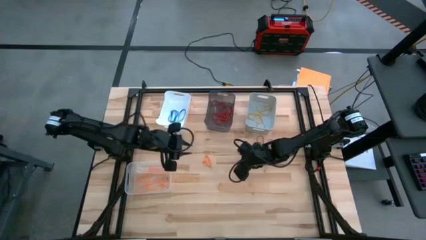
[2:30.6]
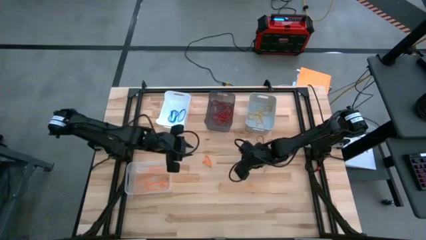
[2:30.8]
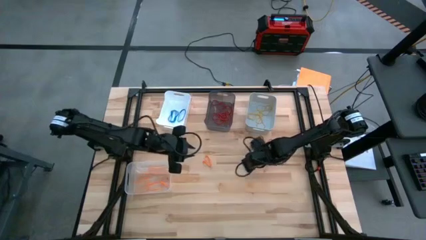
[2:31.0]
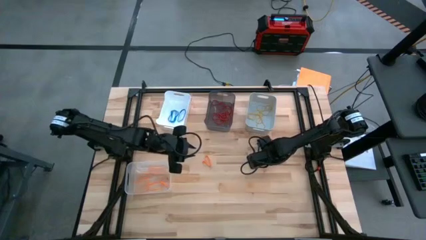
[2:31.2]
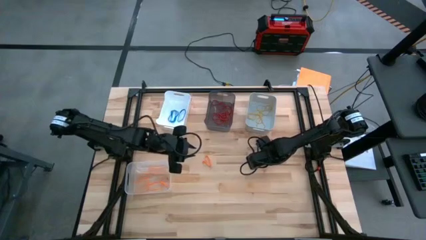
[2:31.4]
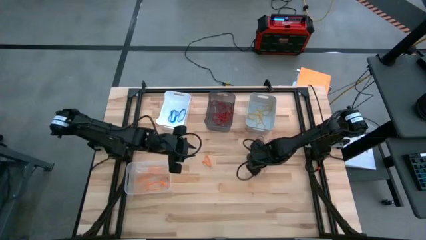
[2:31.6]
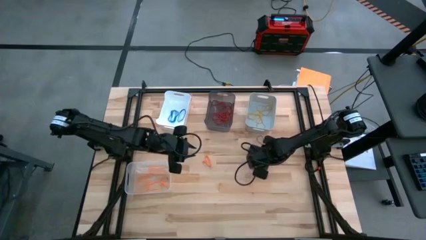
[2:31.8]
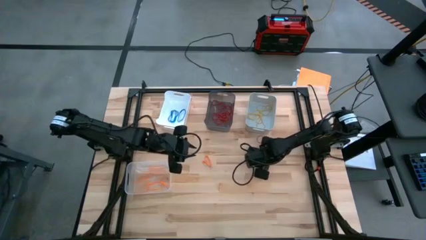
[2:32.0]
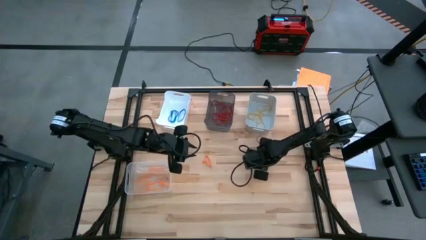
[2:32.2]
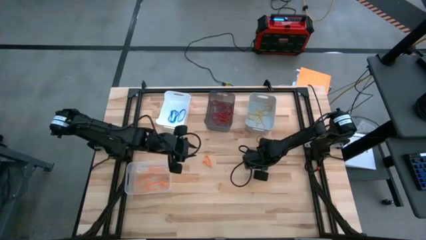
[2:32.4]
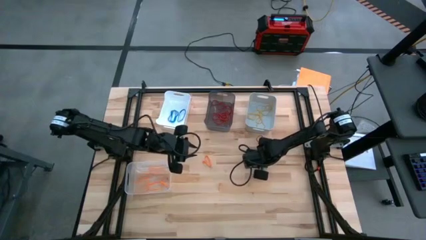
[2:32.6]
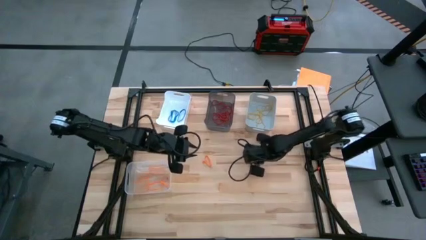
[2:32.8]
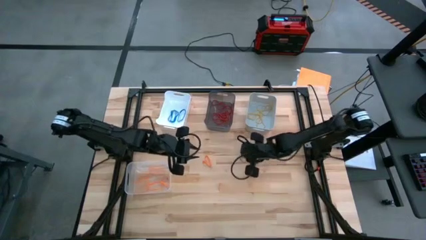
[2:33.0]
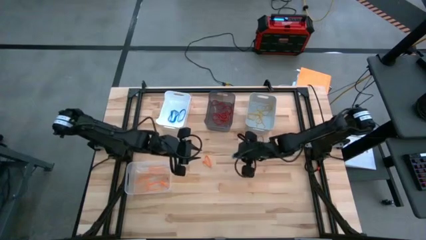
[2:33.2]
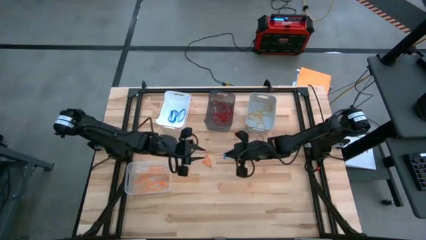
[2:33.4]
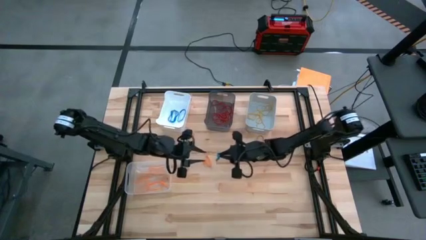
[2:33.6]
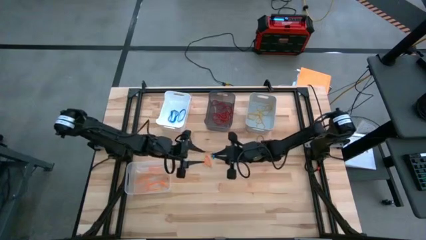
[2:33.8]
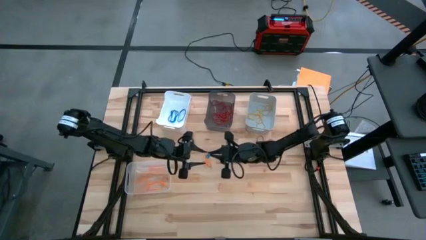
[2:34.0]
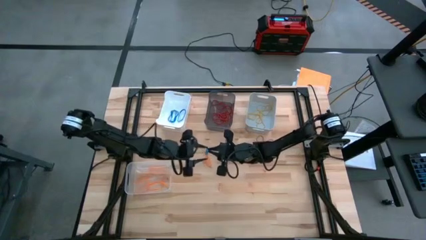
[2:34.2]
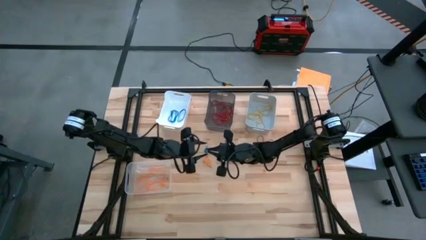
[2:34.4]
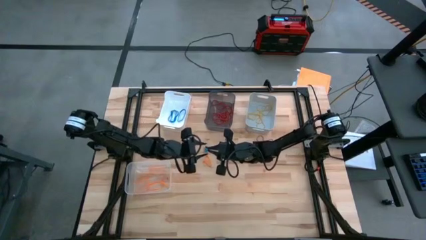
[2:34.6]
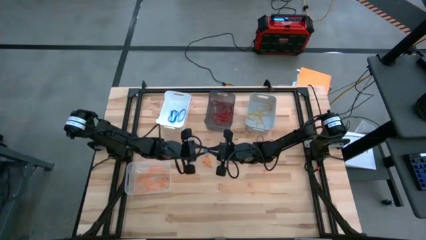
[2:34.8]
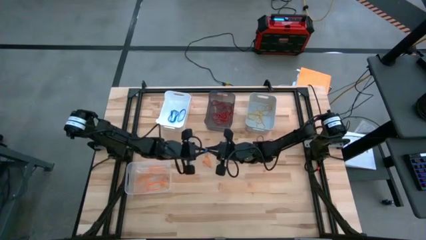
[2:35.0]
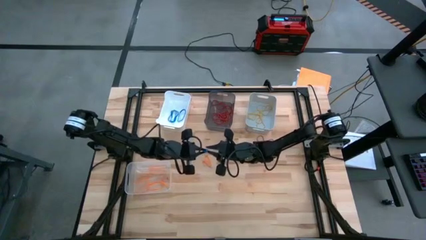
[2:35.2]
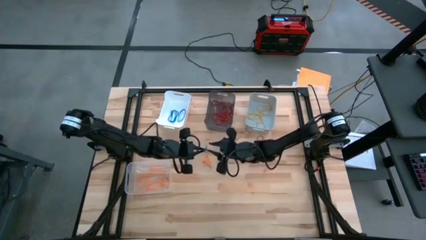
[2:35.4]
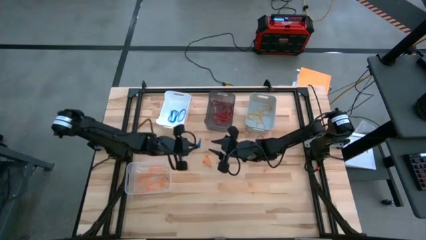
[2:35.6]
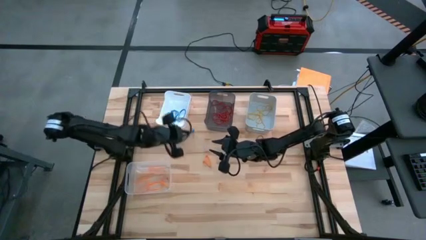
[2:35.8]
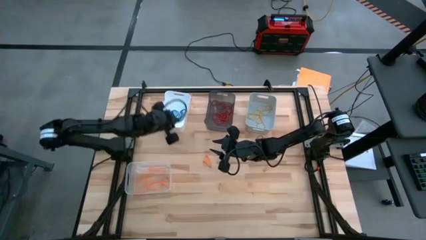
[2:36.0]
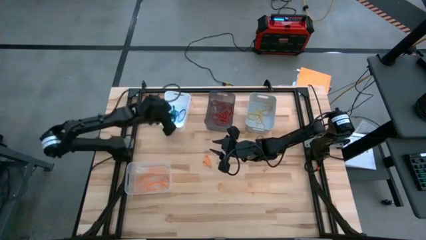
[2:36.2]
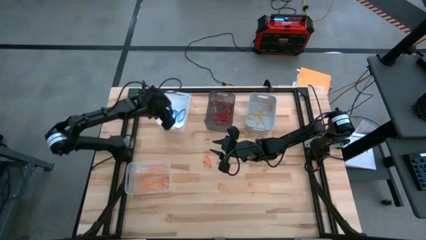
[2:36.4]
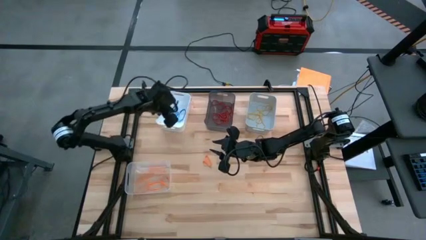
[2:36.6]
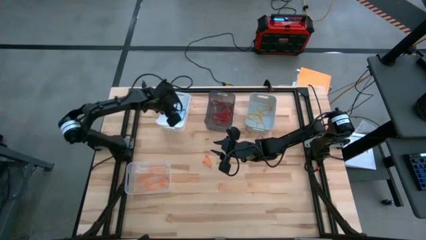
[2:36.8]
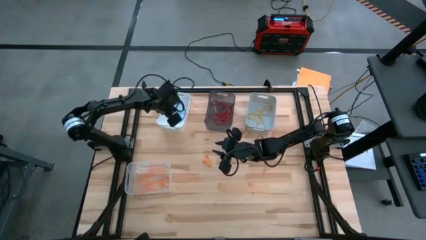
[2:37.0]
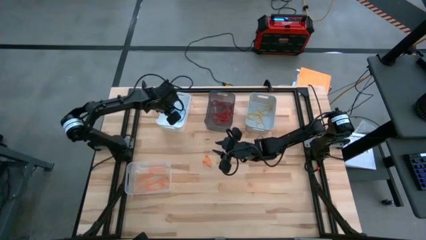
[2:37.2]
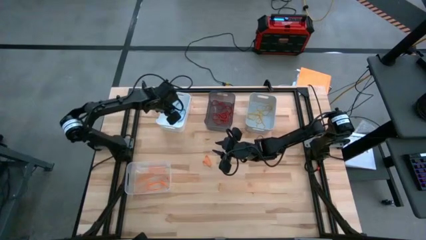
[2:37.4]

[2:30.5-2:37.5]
Task: Sort rubber bands into baskets
Put the blue rubber band into the white bin

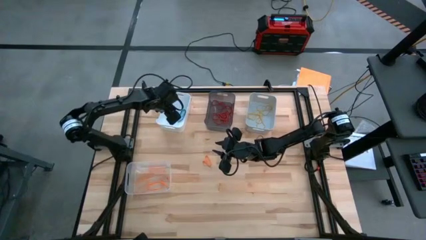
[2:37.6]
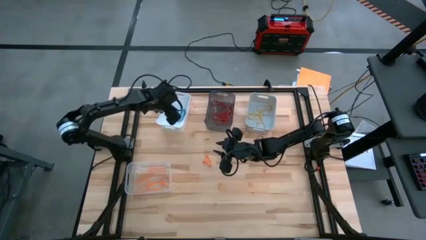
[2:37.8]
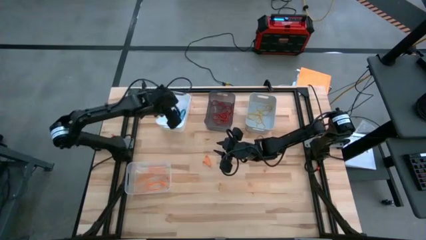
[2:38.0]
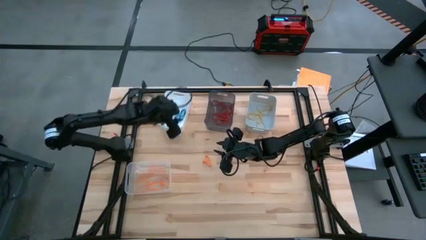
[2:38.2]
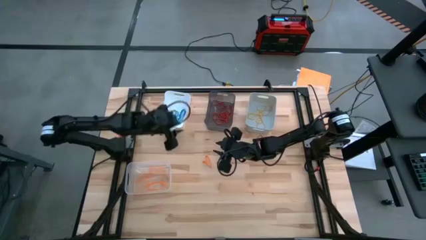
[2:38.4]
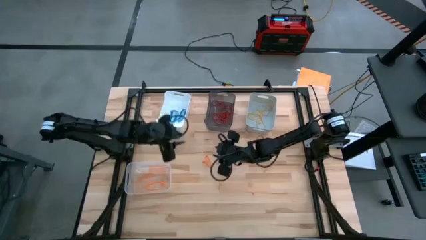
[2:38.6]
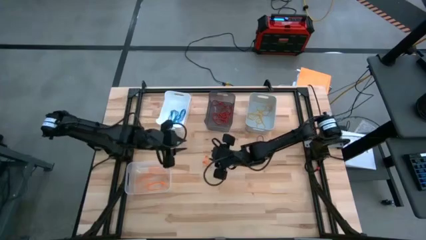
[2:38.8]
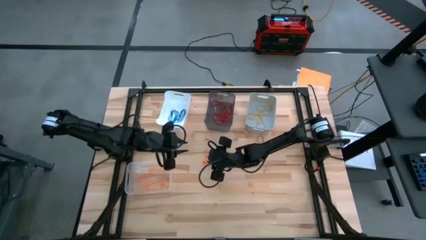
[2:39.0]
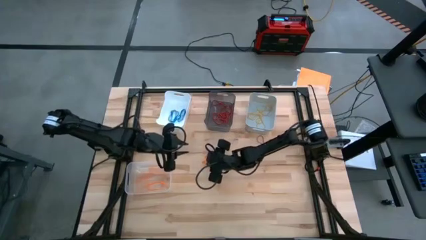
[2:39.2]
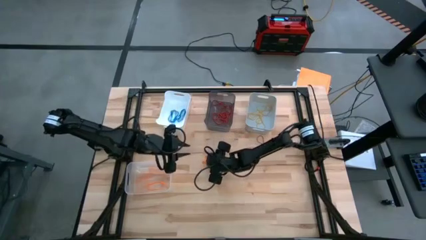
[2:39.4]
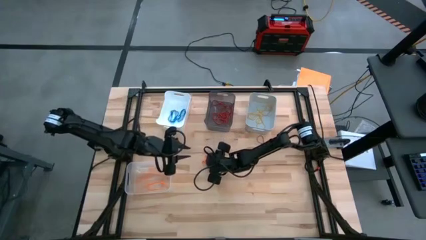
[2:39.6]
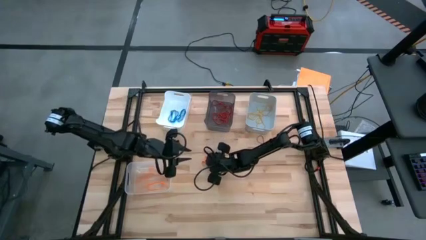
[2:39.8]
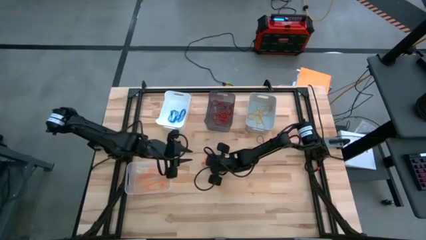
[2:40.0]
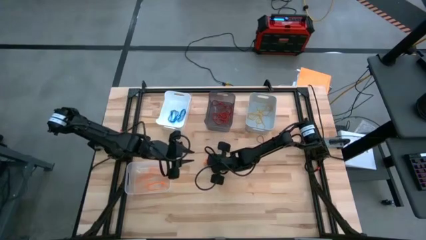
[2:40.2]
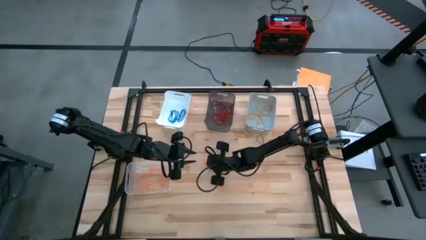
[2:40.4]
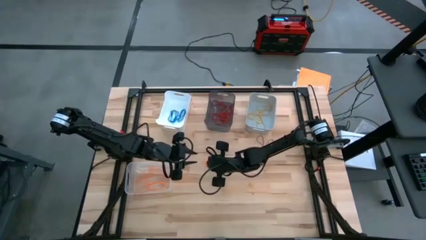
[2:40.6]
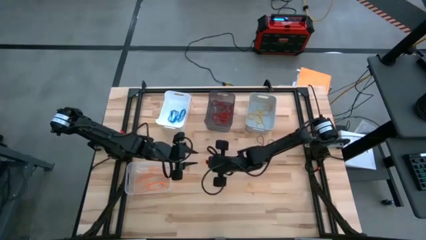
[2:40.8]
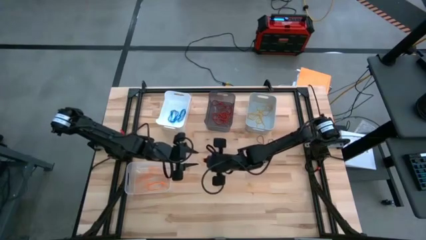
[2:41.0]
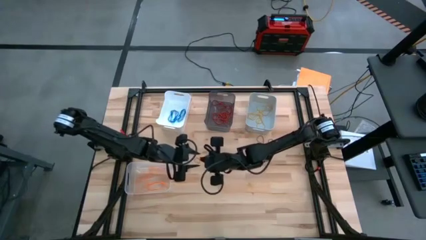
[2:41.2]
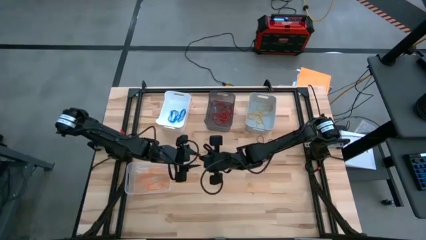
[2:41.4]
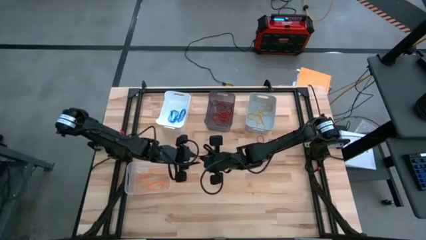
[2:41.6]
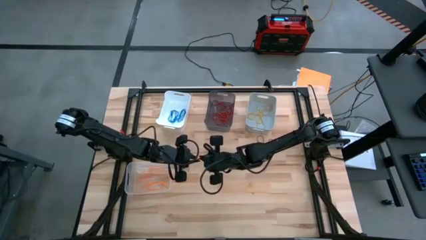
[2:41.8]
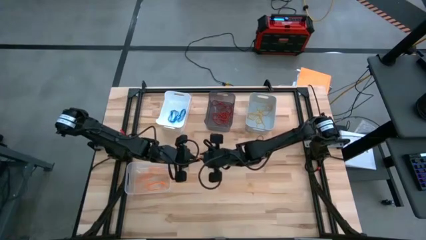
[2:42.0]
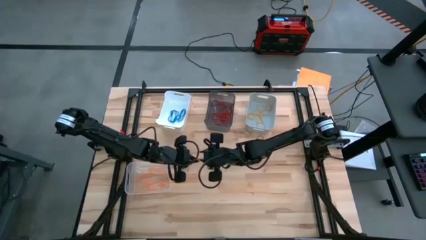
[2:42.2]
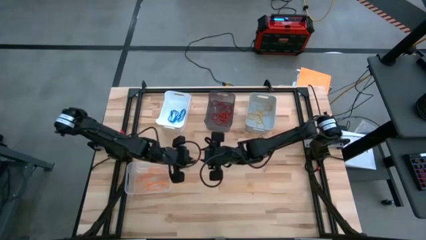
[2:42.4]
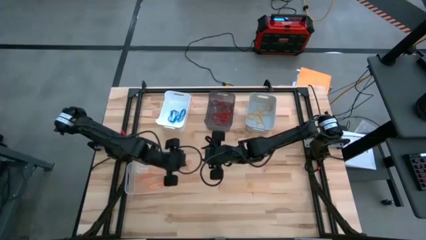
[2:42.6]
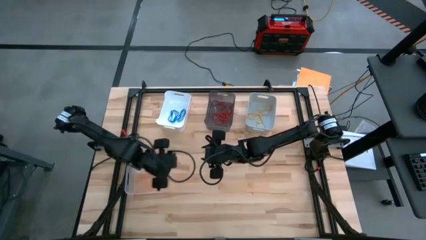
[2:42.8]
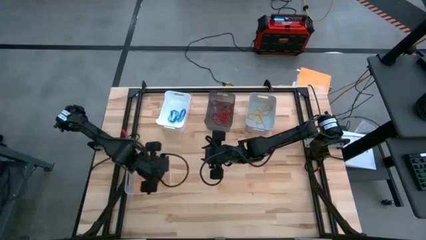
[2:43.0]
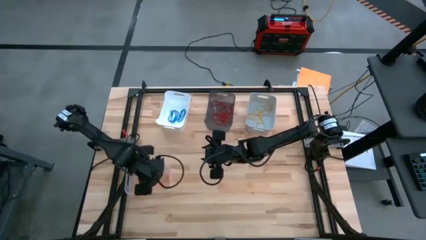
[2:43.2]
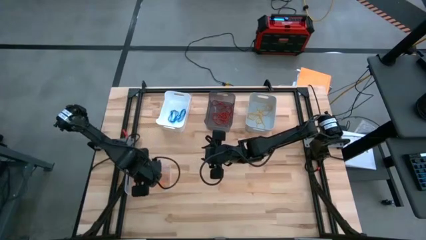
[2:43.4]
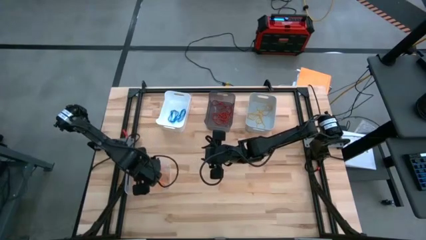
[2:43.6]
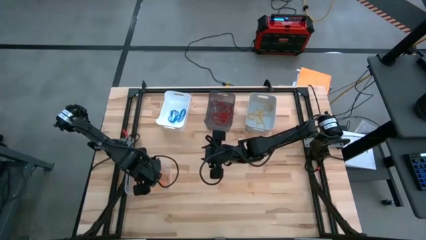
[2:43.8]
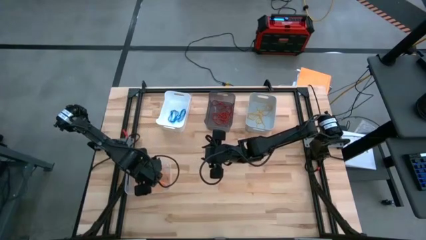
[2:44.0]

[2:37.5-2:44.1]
Put the orange rubber band into the transparent bin

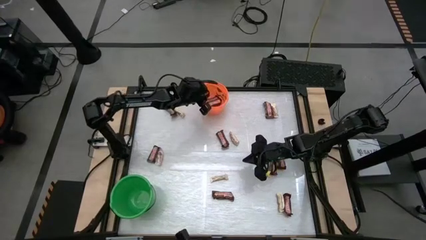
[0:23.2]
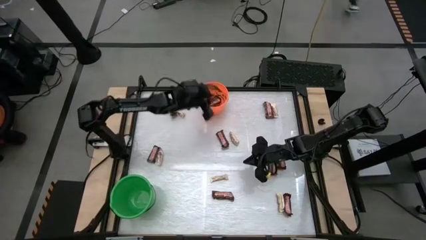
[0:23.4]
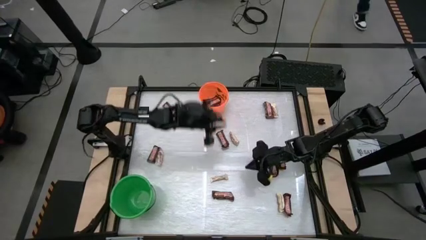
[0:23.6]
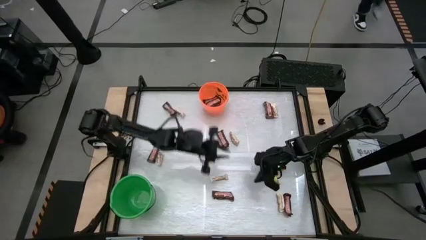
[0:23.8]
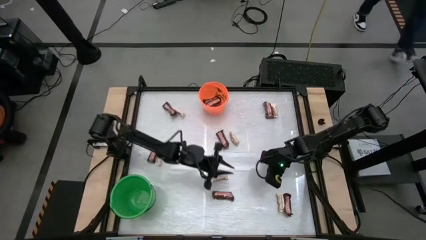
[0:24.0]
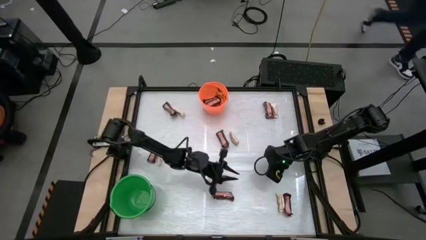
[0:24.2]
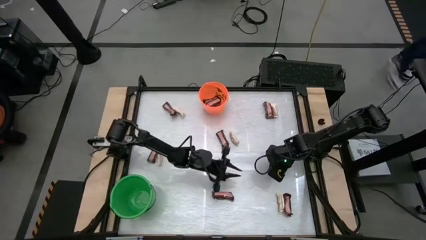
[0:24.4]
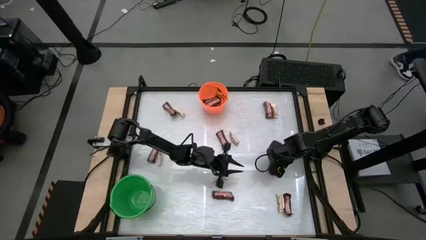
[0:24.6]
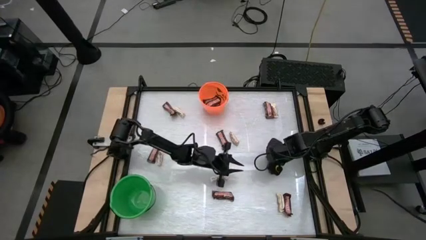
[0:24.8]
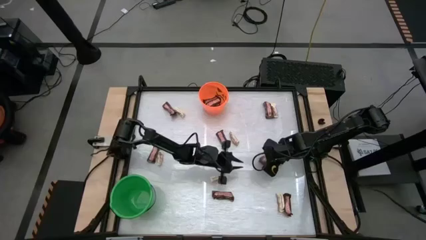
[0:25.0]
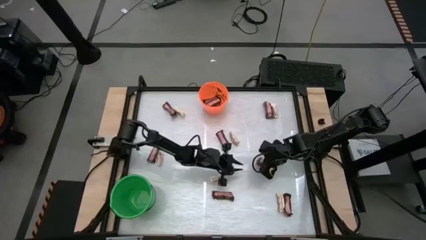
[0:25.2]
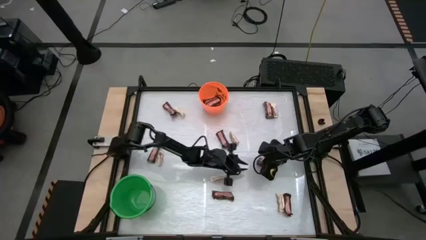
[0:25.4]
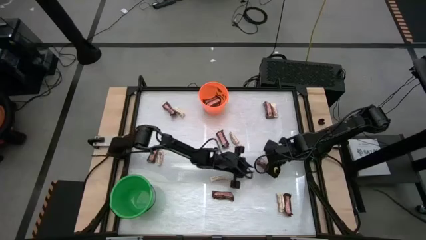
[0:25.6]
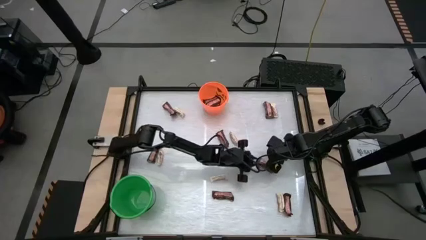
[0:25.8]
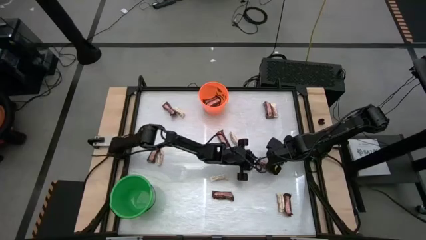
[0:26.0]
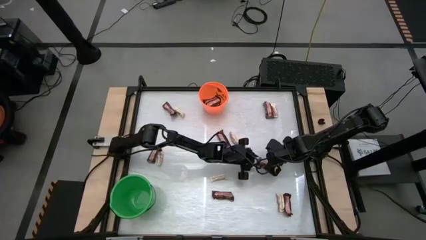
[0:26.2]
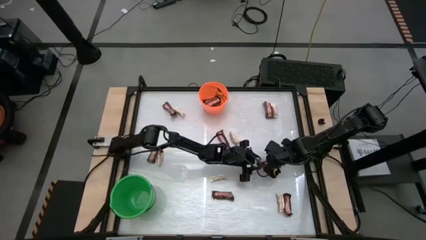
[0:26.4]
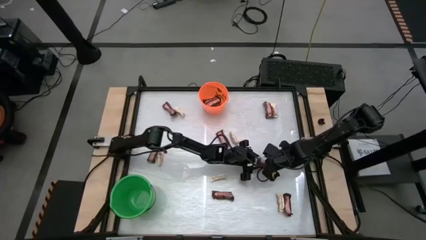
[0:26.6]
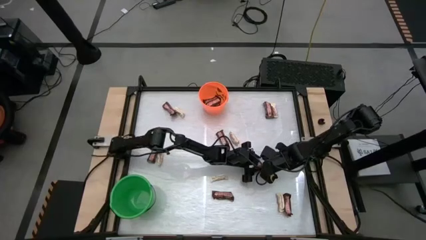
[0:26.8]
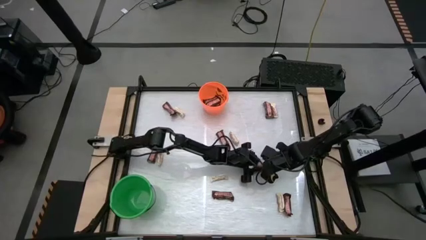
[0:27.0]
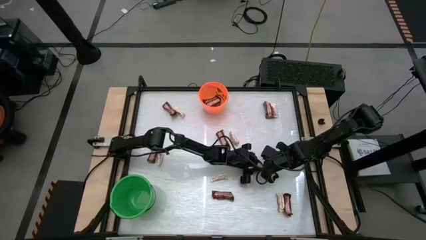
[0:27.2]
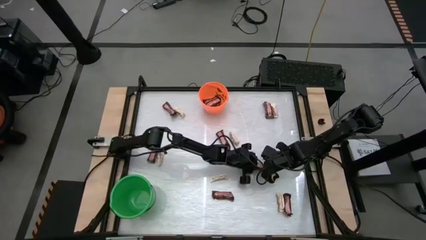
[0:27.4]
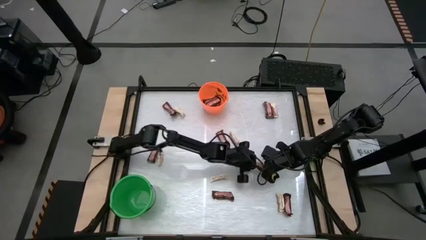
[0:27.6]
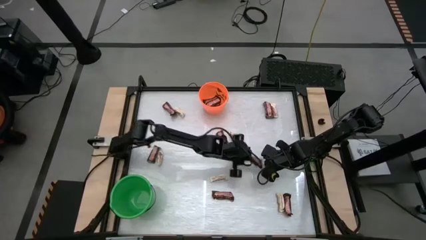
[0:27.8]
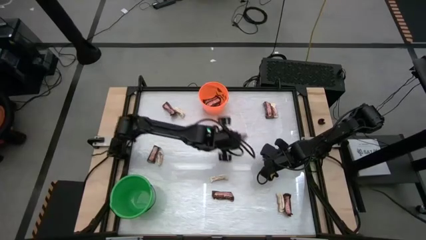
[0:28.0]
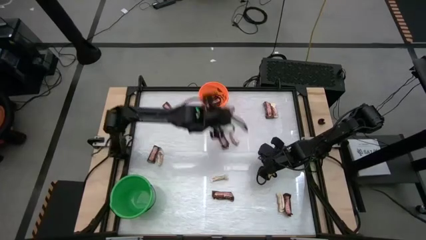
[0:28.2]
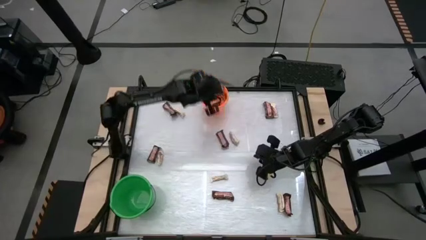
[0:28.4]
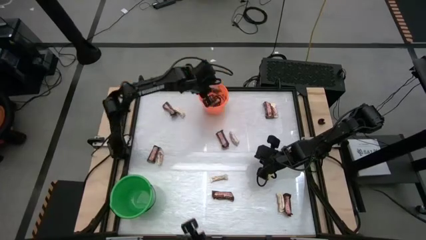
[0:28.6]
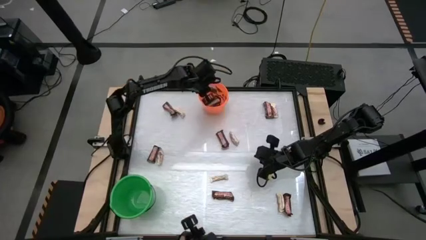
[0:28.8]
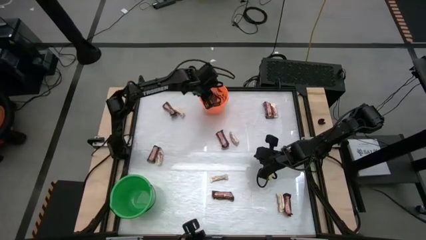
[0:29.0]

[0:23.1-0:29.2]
Task: Sort candy by brand, put in halloween buckets
Put the brown chocolate bar into the orange bucket
